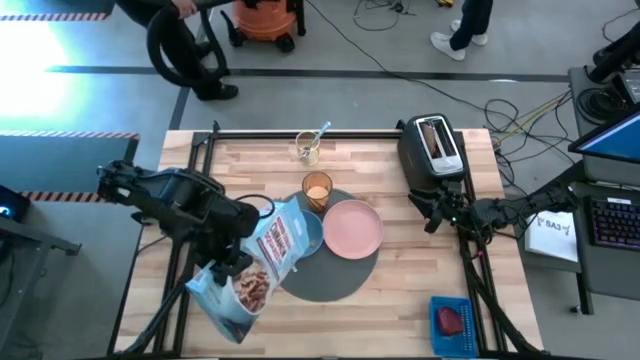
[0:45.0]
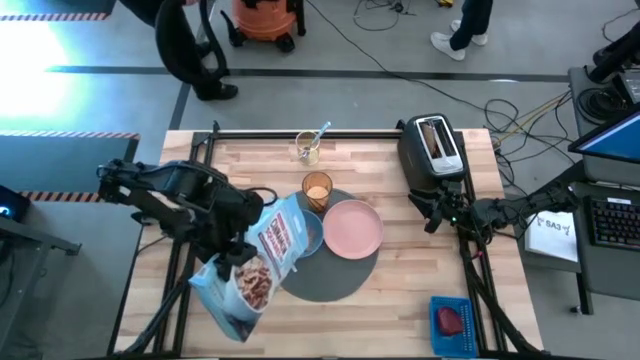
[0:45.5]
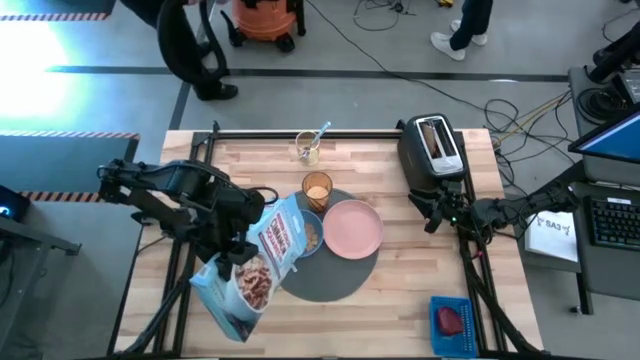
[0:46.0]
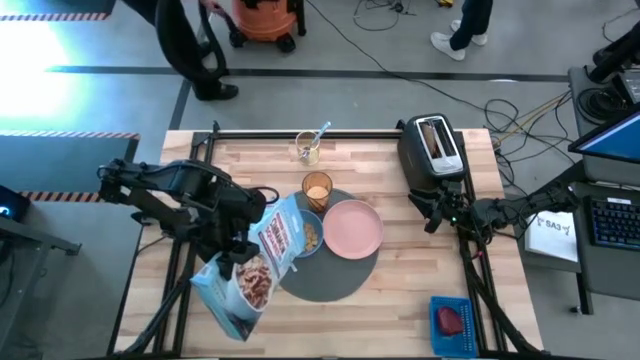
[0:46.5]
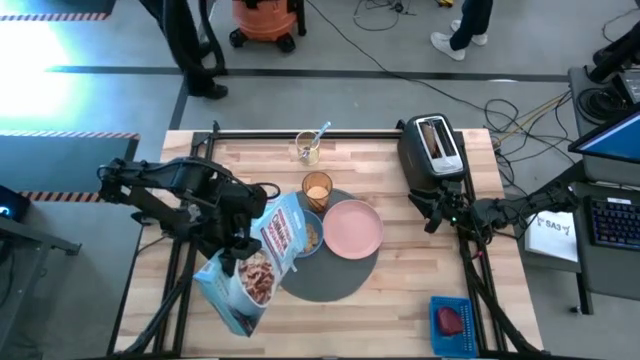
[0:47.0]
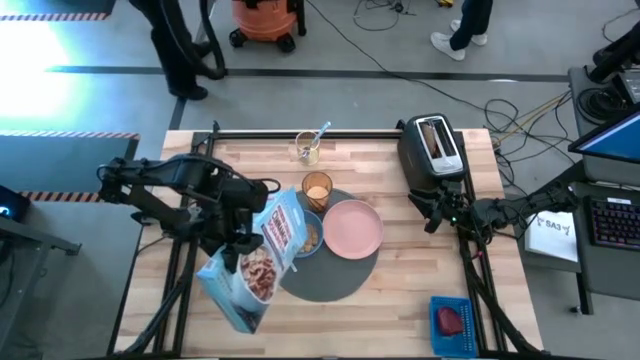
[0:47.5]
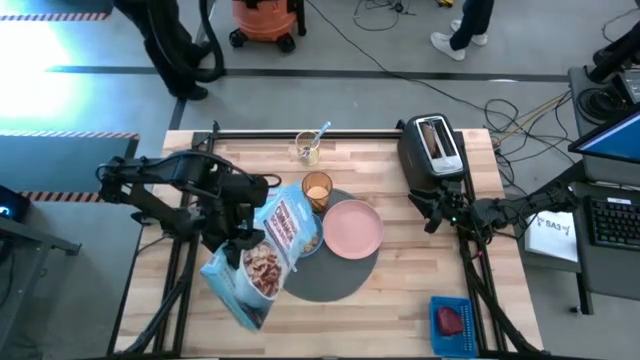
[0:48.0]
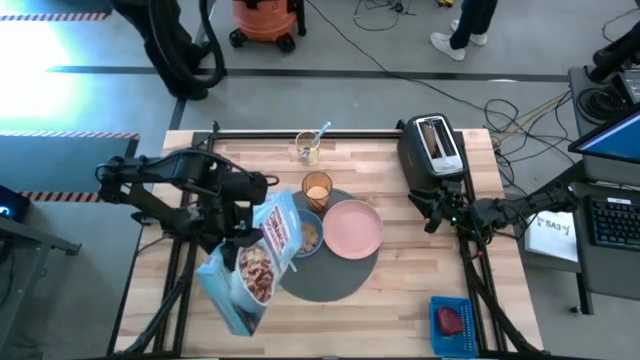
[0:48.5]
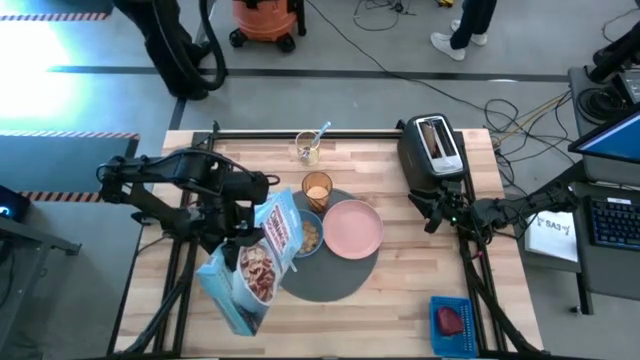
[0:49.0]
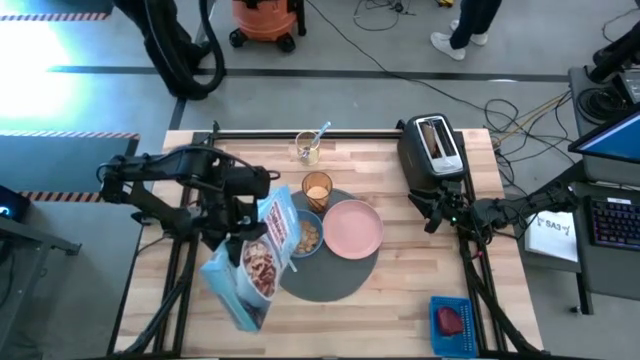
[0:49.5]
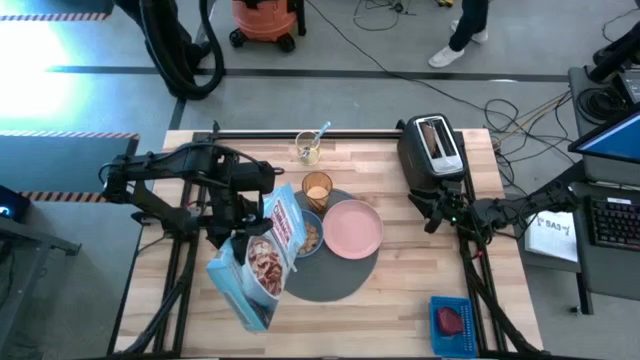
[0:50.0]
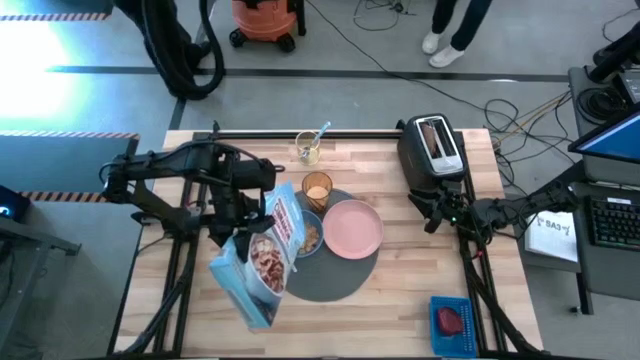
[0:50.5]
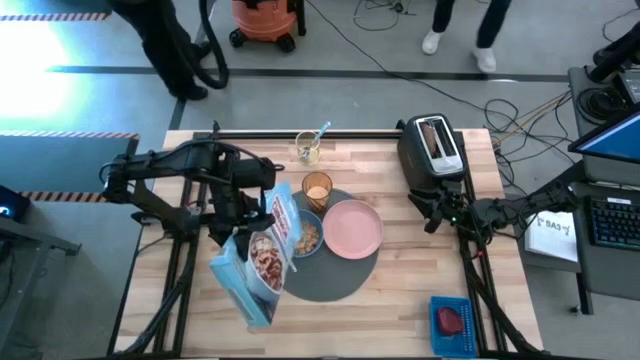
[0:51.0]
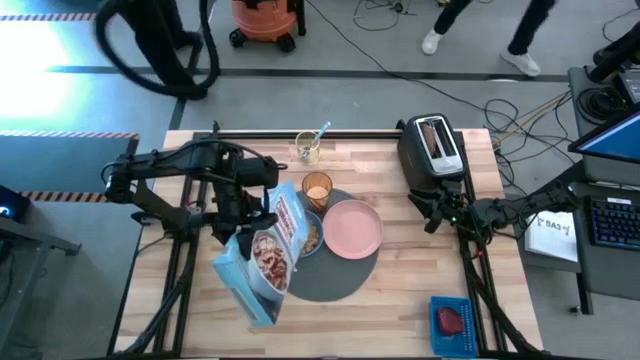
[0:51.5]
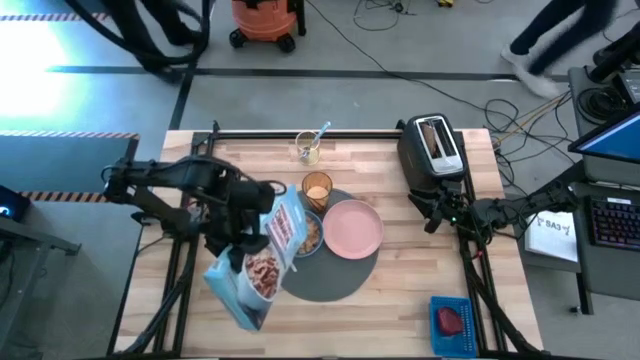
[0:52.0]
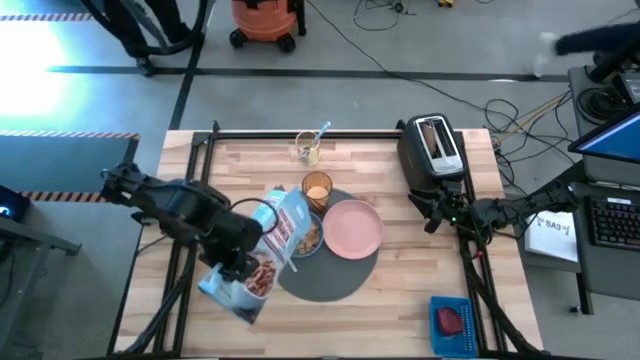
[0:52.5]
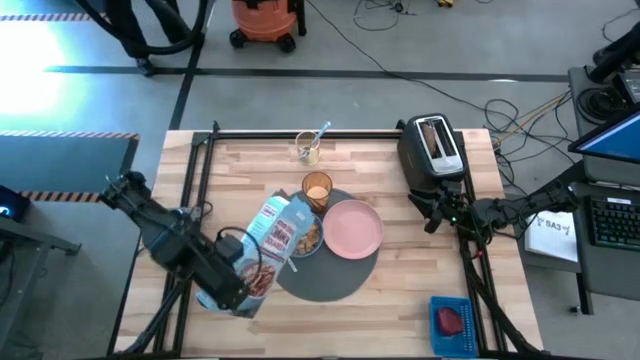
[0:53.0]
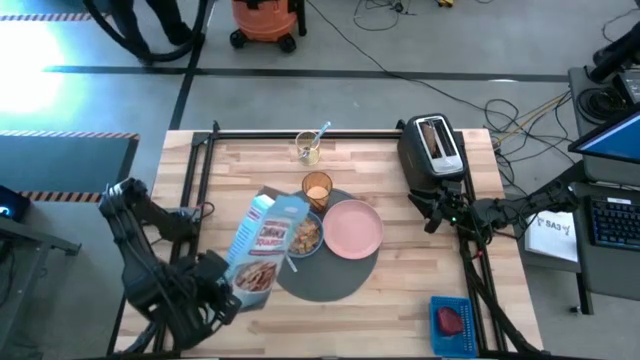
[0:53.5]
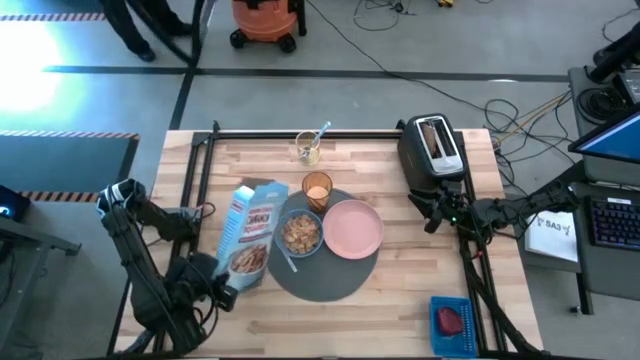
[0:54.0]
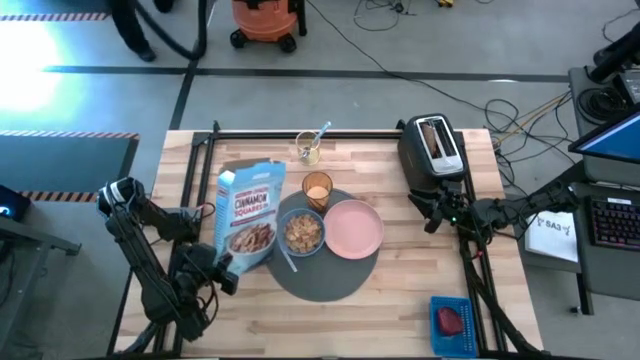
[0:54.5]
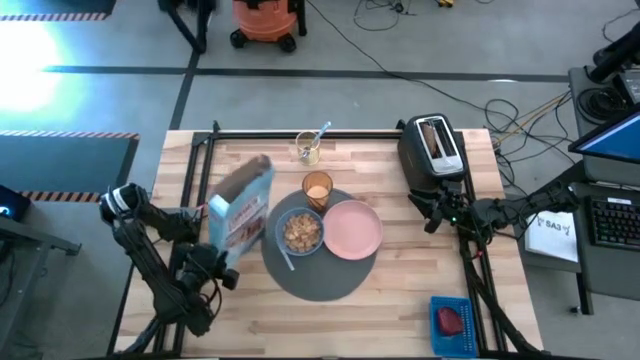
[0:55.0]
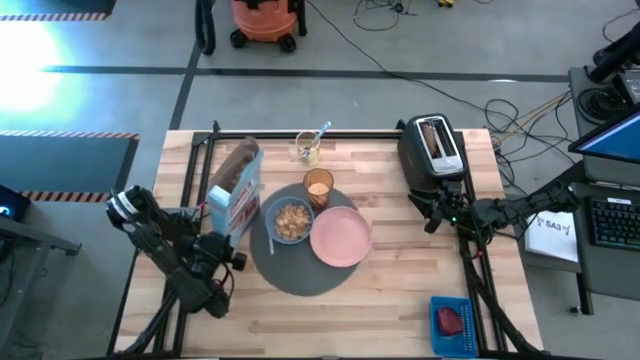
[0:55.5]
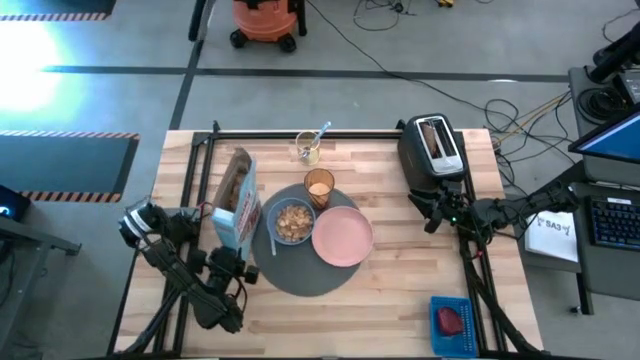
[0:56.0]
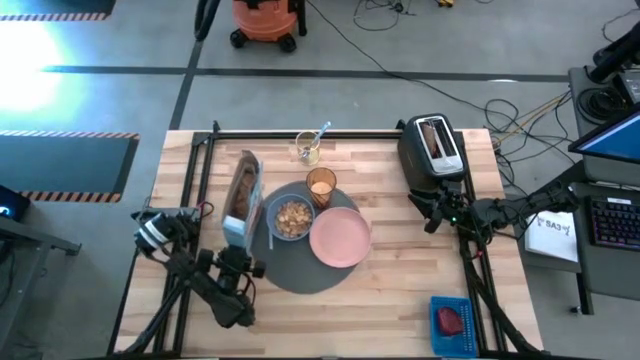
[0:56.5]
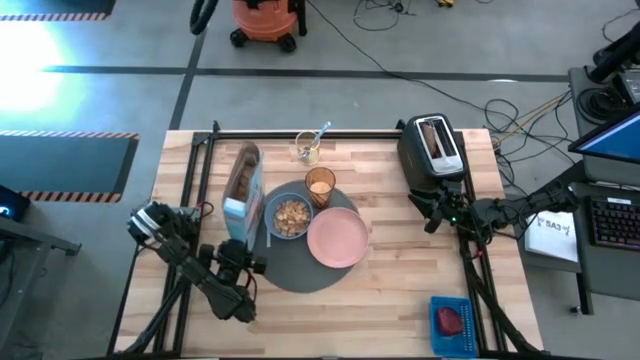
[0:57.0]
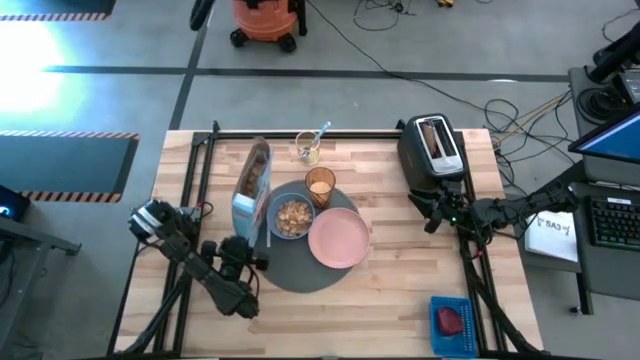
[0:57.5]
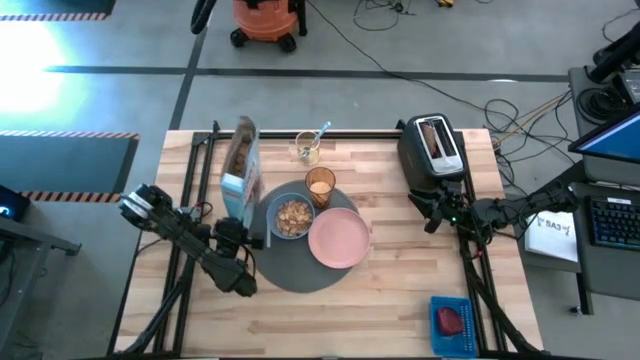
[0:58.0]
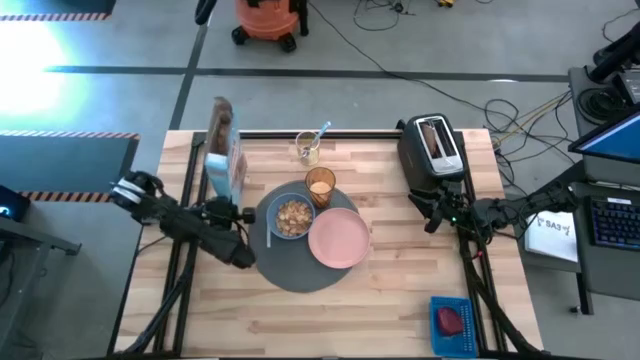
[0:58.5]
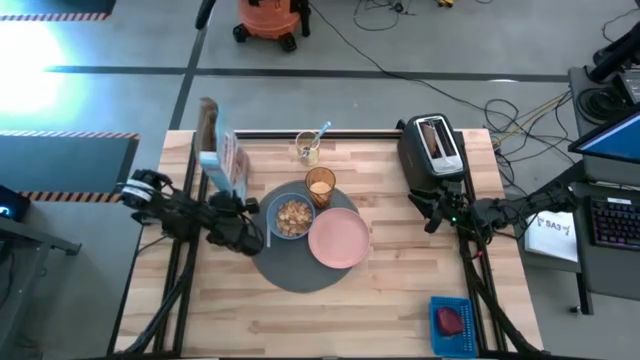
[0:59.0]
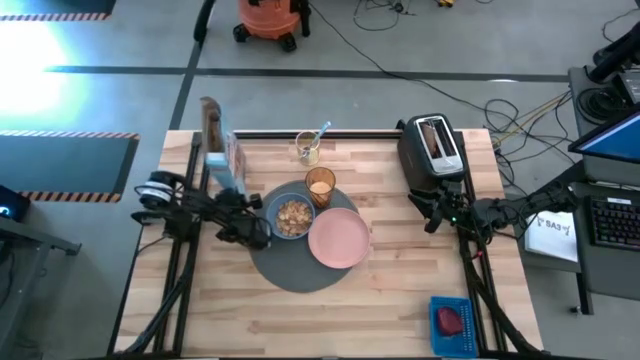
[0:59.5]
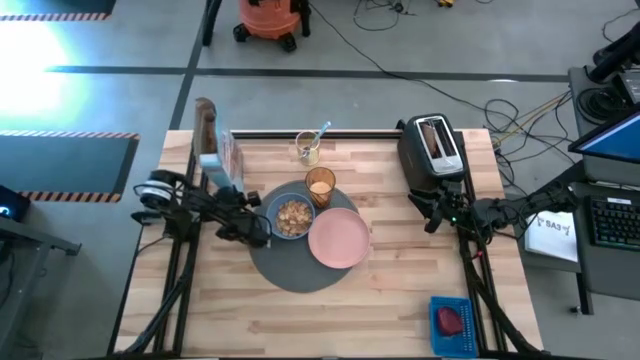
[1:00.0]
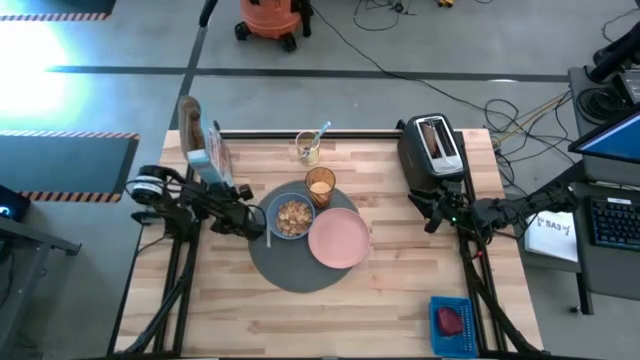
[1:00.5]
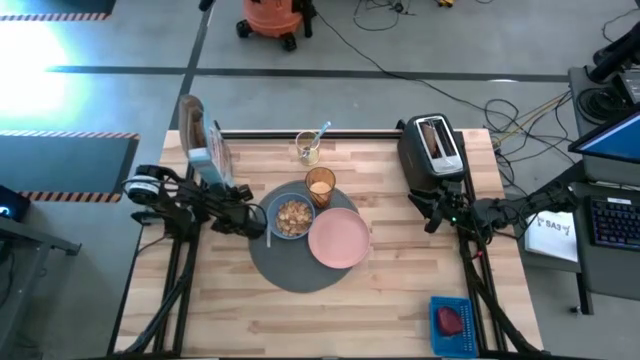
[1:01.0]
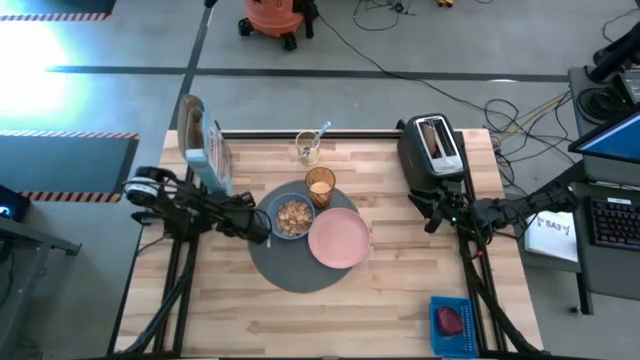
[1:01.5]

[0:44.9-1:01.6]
Task: Arrange a breakfast setting
Pour the cereal into the blue bowl

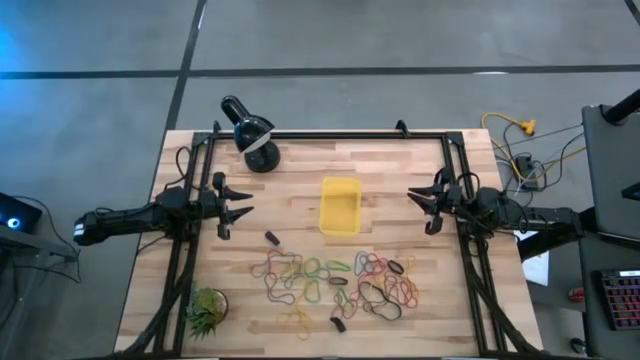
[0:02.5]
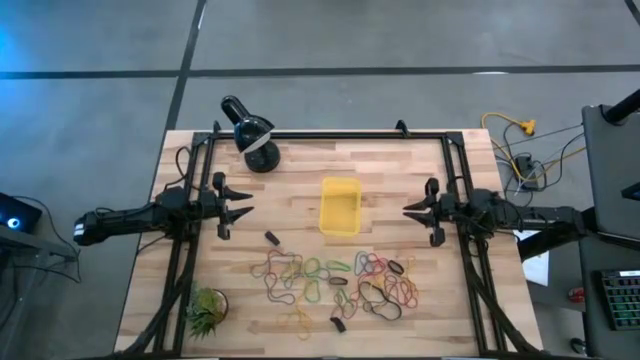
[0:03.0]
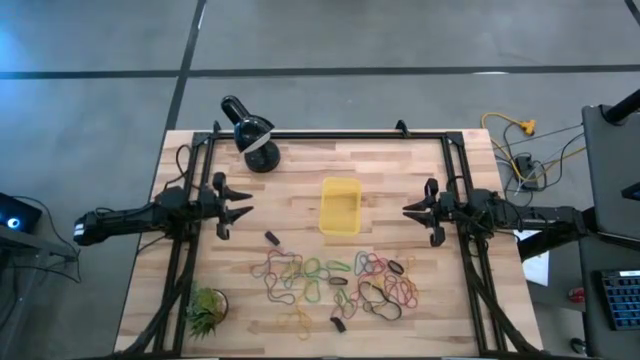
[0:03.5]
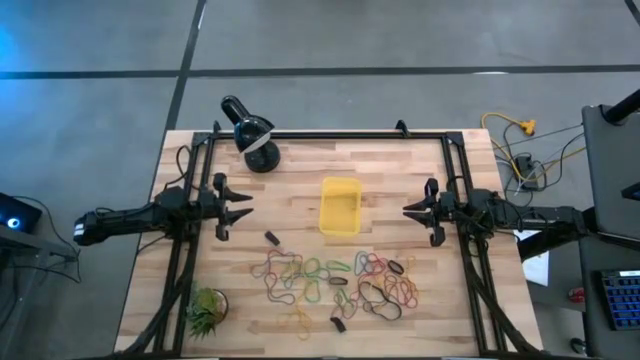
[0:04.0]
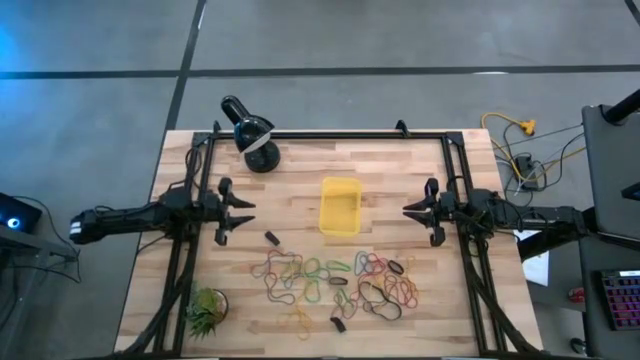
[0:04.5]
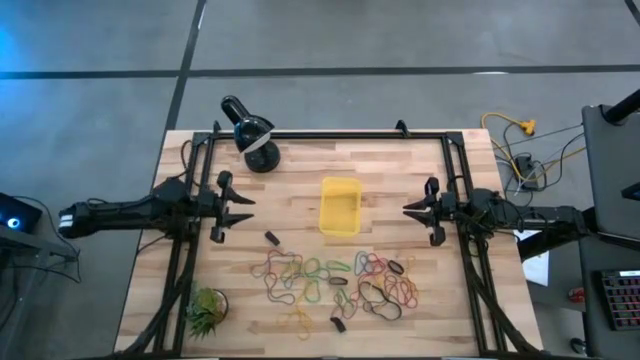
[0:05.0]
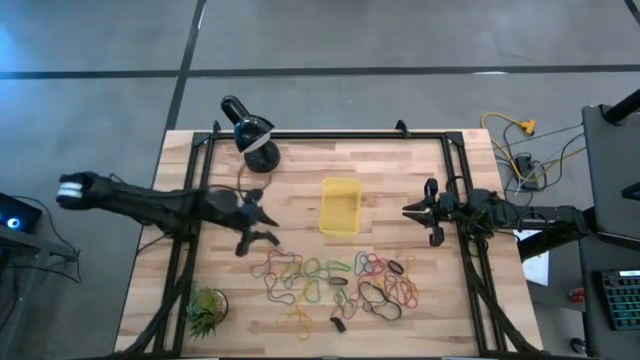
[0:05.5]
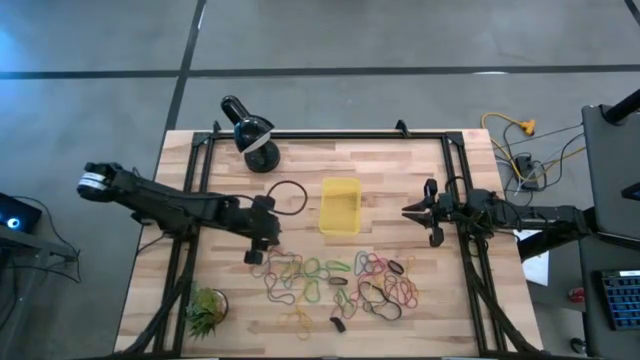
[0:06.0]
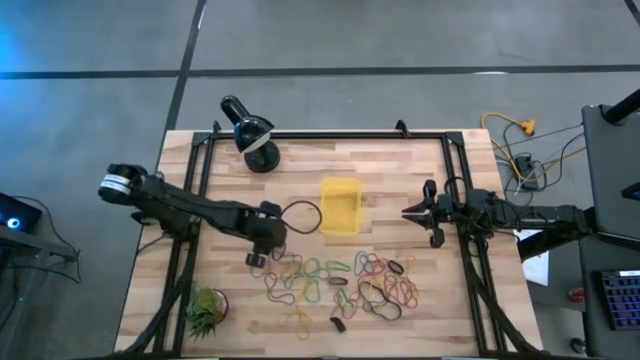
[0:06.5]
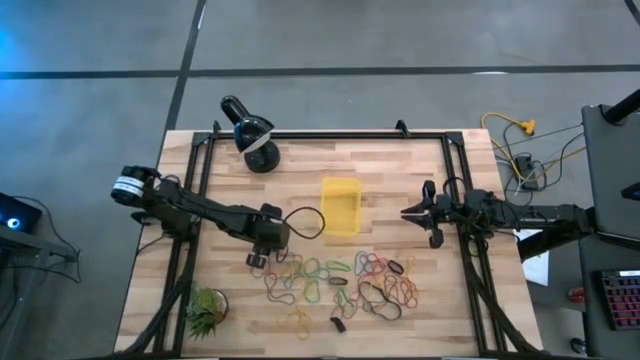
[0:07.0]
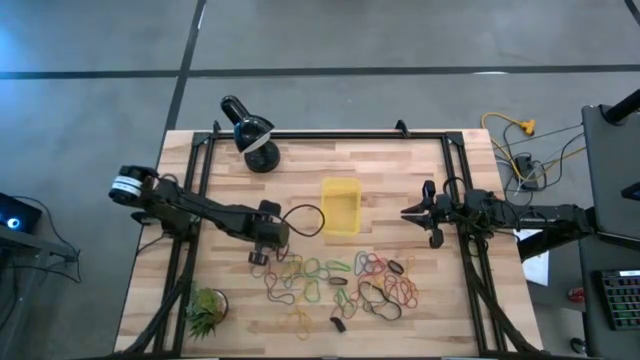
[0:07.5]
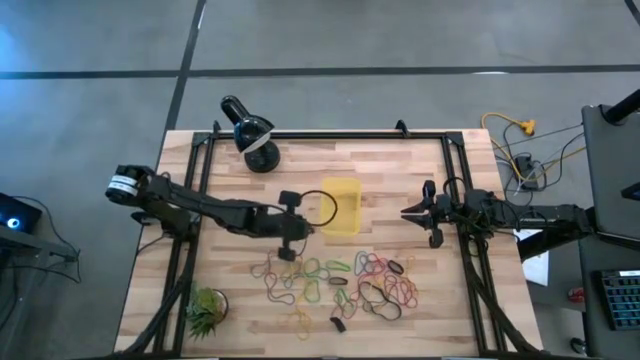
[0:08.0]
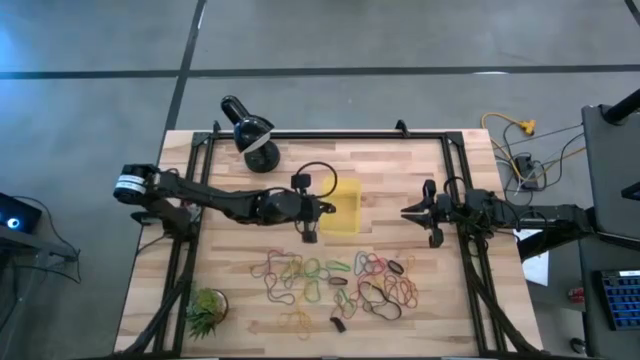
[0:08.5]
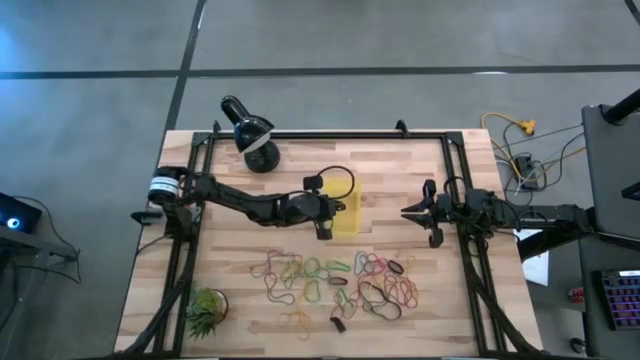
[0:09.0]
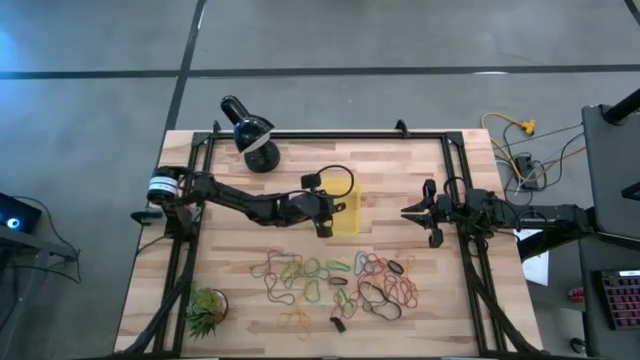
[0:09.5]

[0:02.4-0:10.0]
Task: Pick and place rubber bands into bin
Put the black rubber band into the yellow bin
